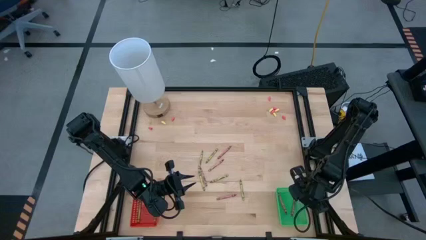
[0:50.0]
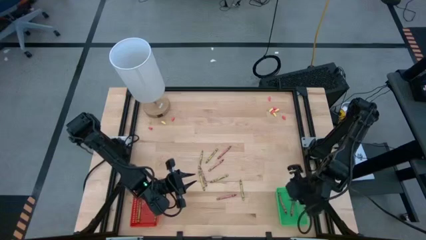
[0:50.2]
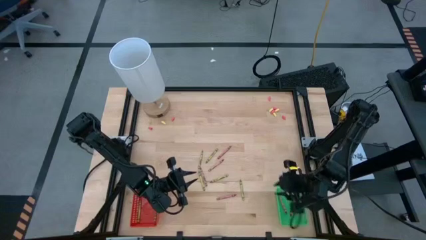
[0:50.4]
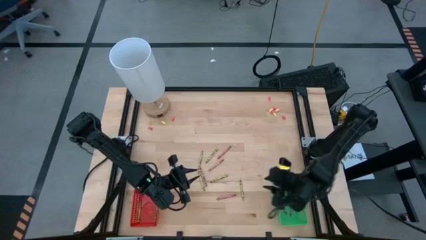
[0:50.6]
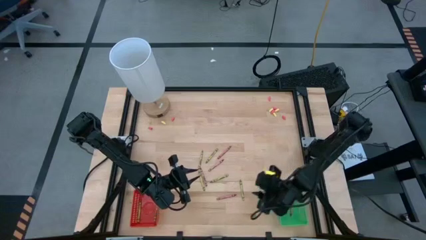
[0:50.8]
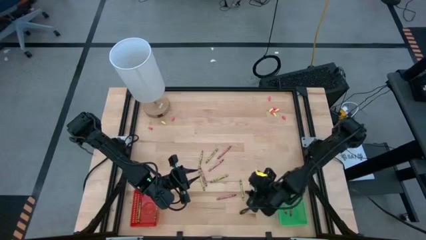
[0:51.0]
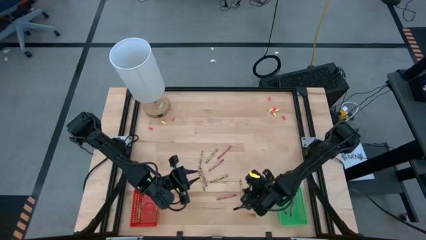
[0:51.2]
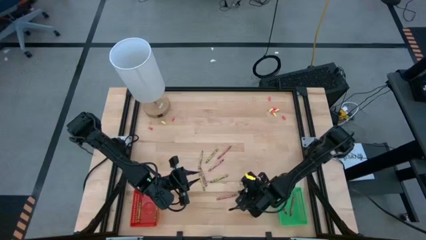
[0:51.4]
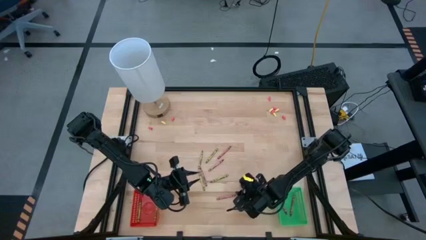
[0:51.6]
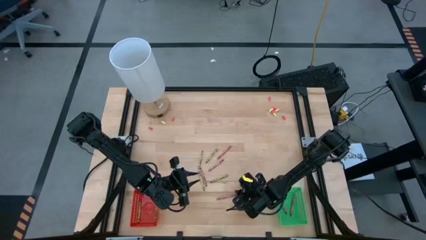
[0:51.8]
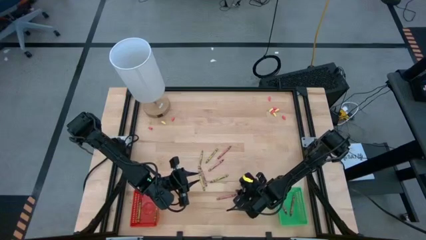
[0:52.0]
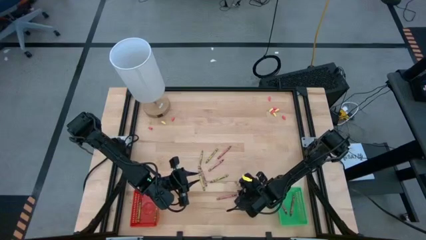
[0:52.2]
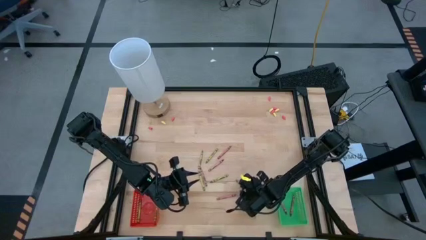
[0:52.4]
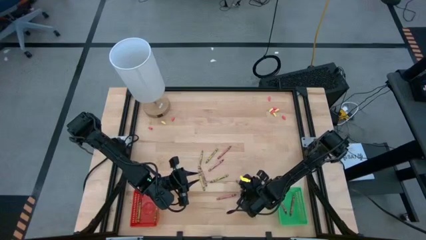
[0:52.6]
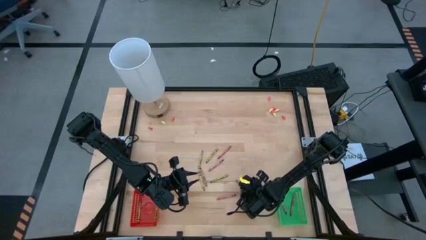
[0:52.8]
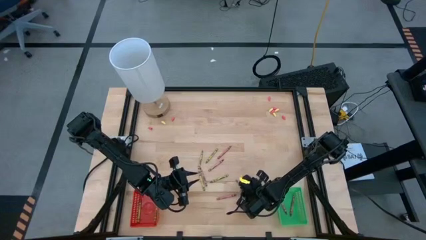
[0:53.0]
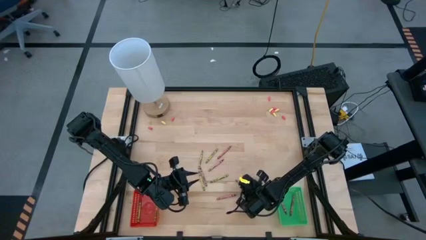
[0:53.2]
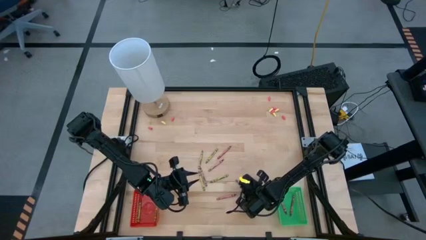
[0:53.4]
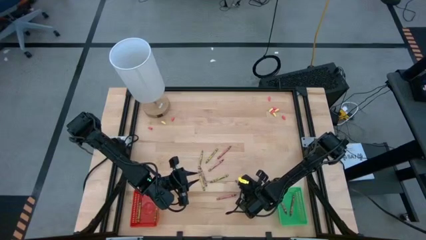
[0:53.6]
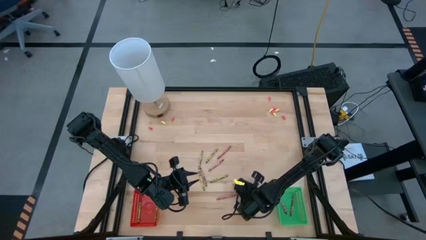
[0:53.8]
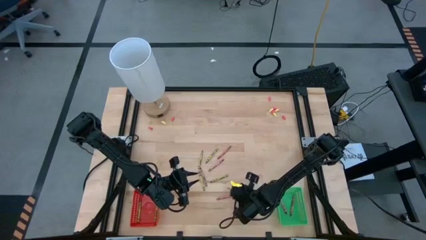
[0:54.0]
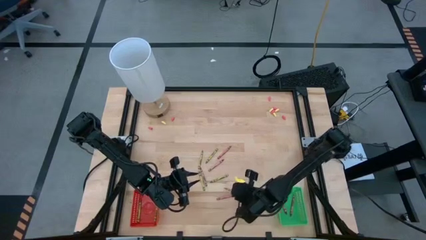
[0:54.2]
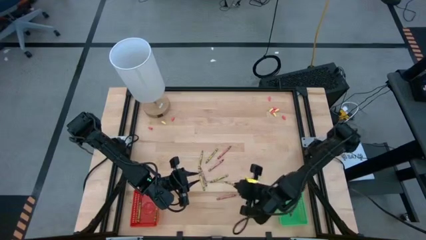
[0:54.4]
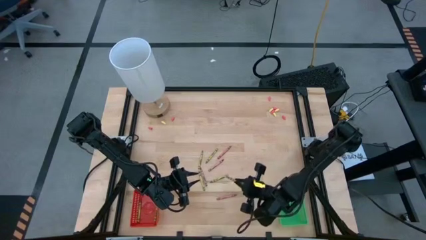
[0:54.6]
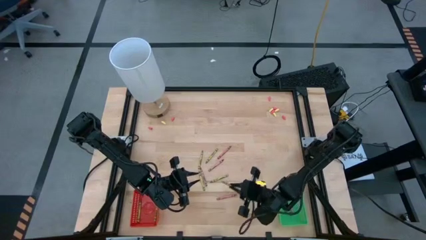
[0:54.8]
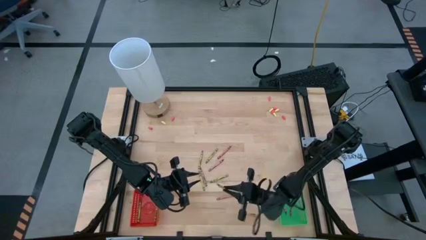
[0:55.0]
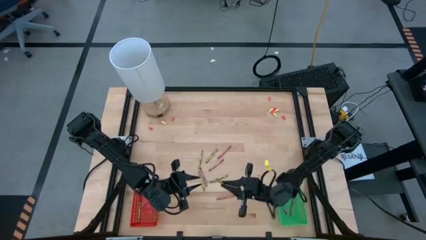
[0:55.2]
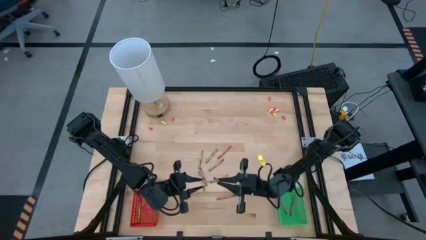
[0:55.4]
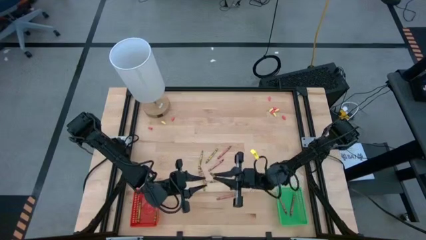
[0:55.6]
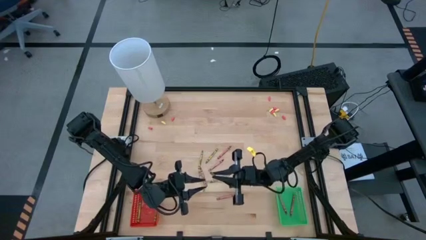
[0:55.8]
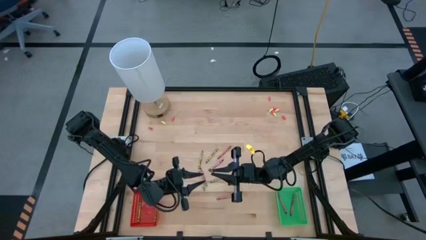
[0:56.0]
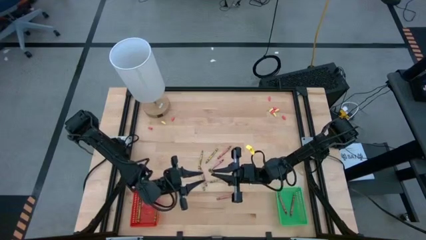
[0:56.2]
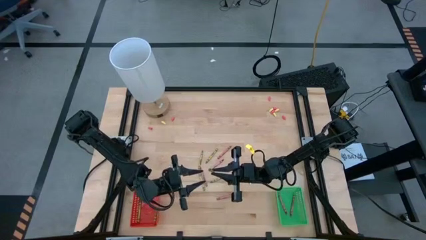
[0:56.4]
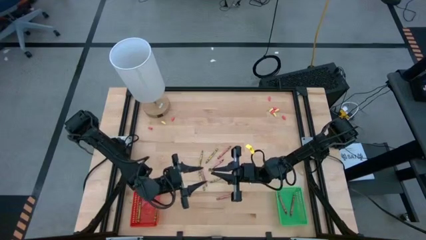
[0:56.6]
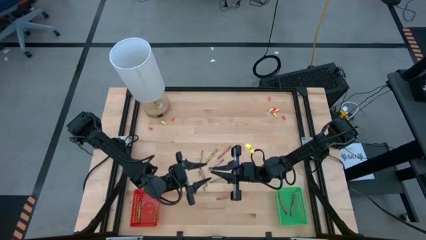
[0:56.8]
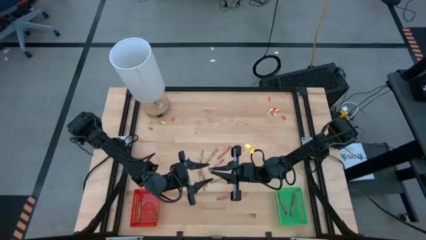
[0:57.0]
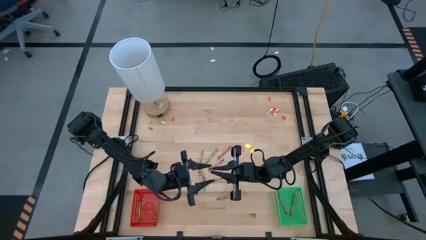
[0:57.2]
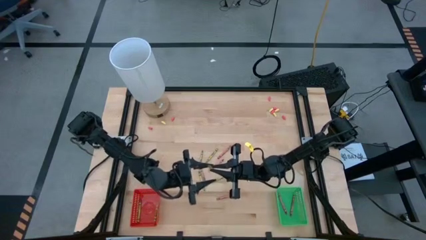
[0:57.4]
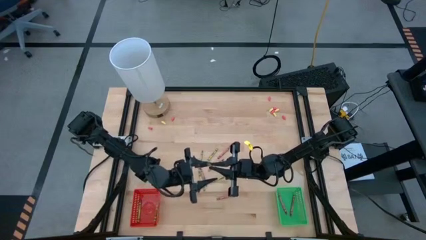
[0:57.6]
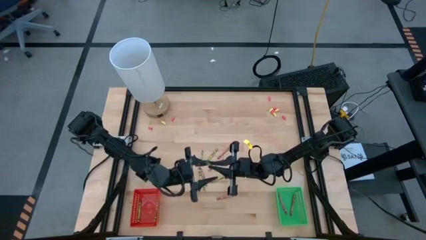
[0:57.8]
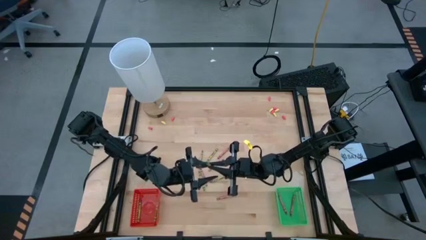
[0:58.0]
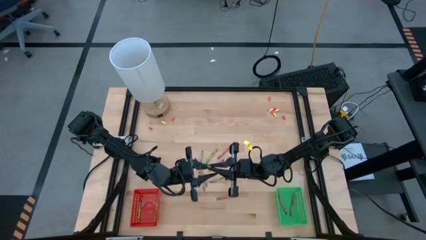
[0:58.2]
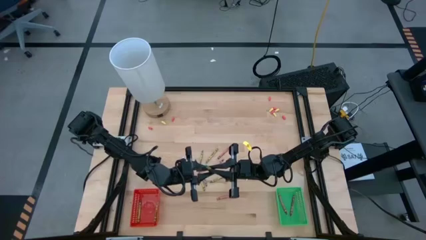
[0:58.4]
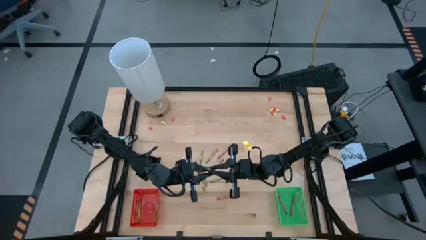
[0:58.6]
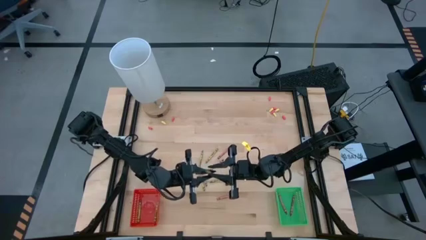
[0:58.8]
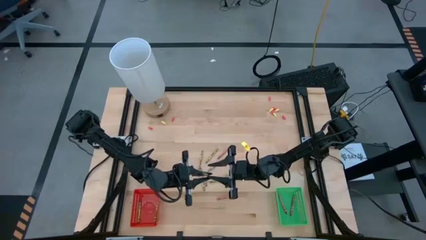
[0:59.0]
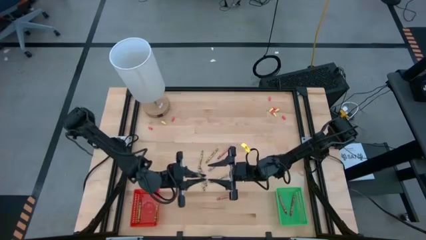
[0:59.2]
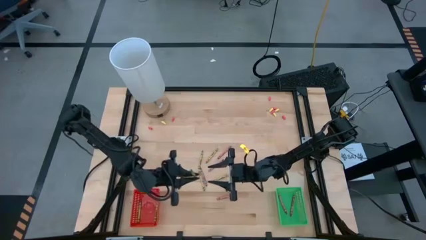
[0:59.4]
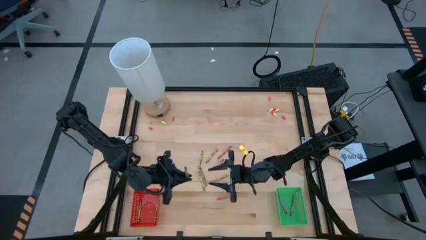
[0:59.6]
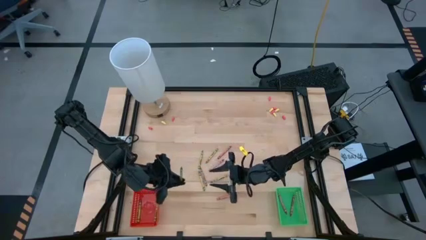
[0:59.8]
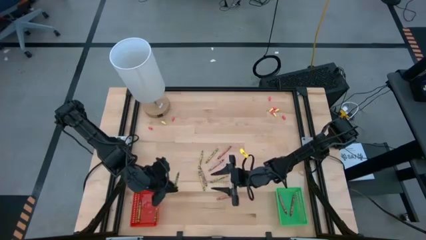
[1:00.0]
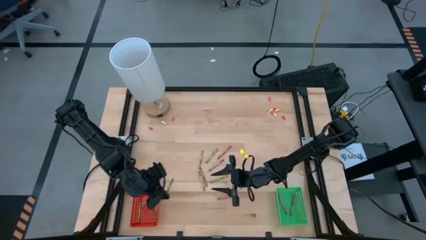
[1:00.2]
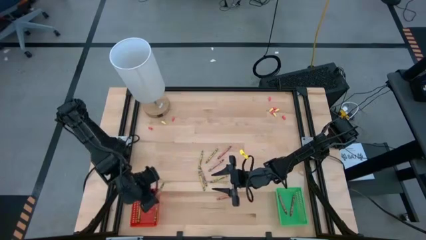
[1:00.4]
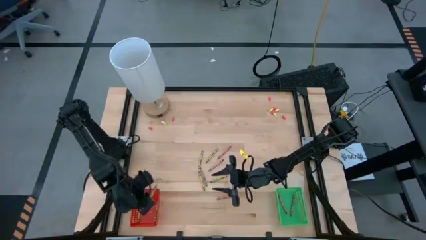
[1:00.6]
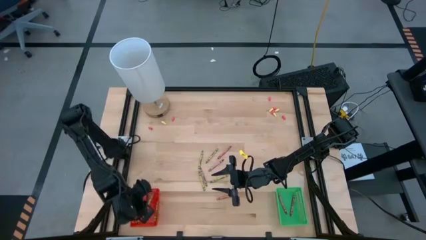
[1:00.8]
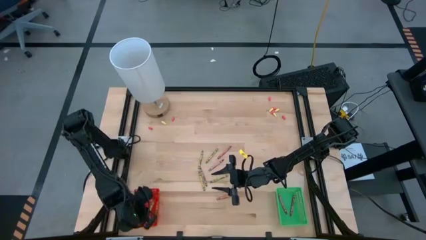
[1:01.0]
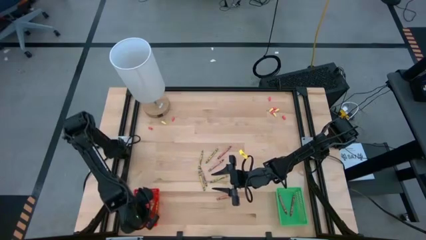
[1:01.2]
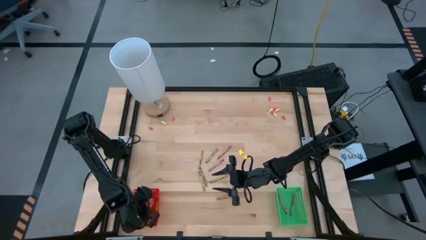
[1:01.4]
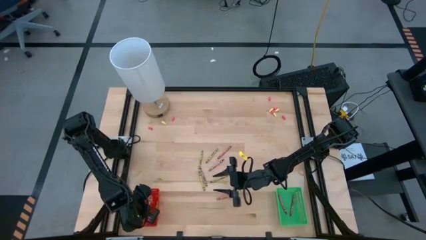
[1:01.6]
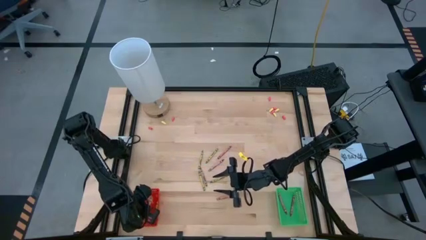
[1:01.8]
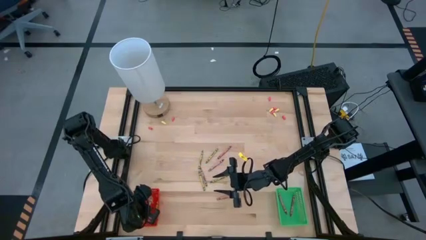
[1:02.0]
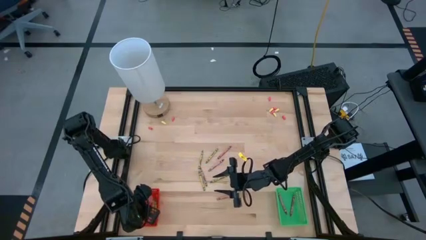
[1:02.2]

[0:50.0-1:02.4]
Task: Sort crayons
Put the green crayon into the red bin

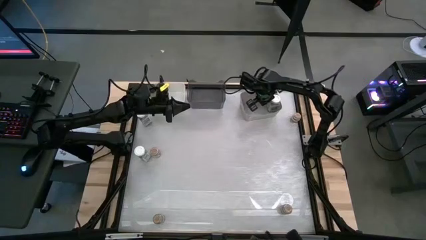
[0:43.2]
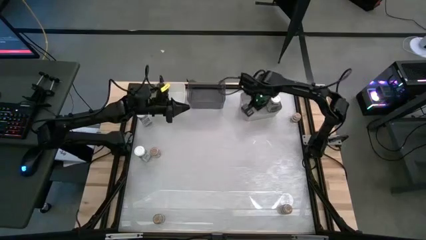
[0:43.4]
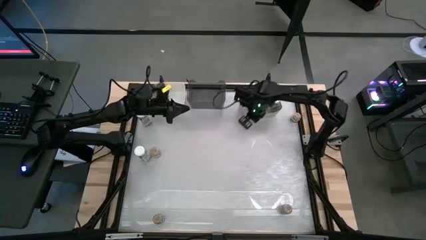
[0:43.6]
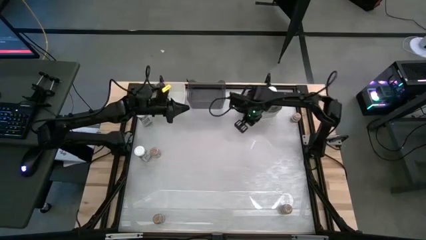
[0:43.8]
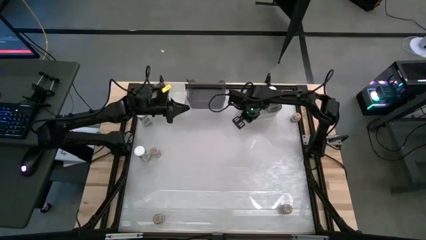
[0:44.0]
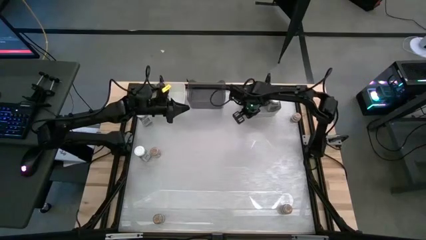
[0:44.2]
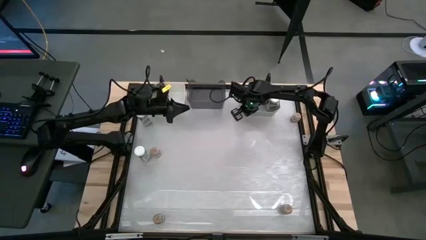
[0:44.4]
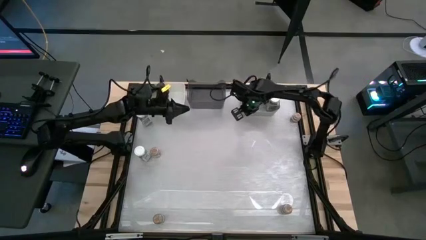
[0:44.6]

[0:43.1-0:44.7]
Task: Sort spices by type
Adjust the gray bin

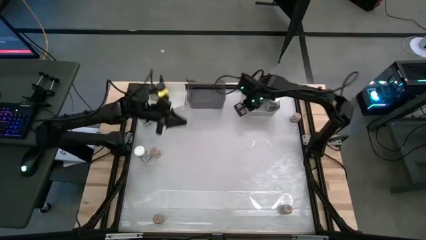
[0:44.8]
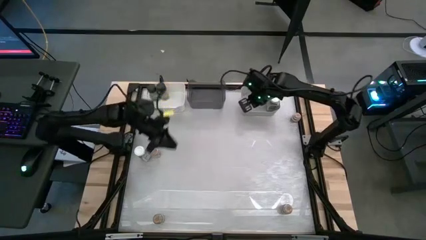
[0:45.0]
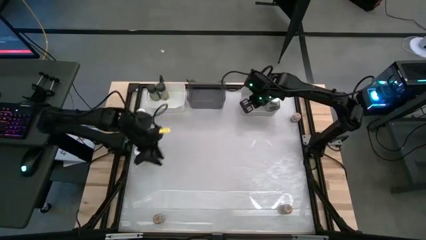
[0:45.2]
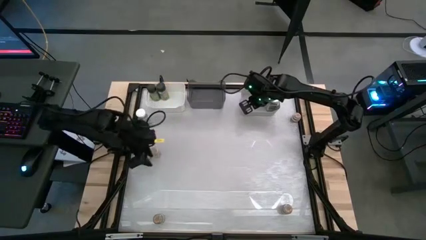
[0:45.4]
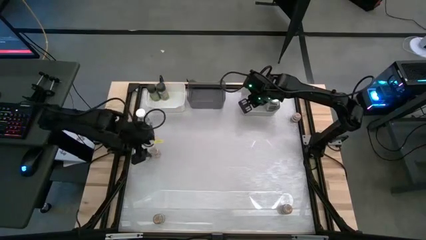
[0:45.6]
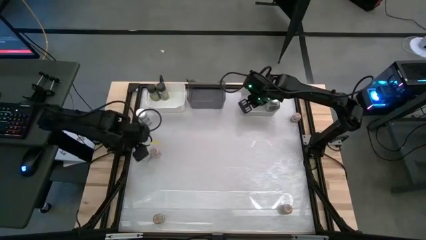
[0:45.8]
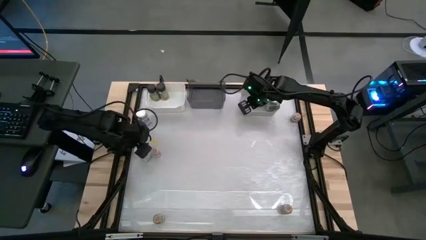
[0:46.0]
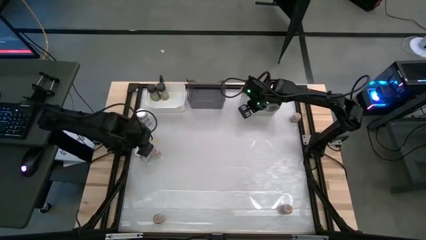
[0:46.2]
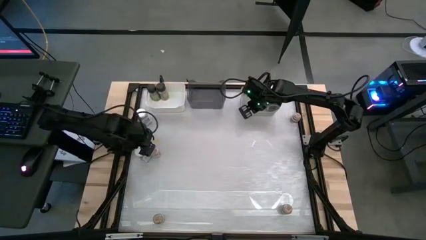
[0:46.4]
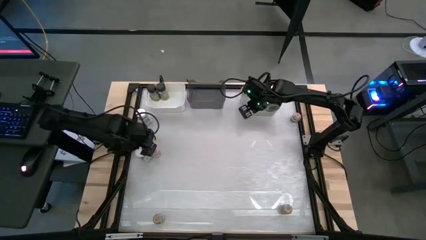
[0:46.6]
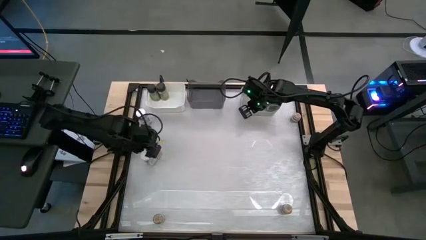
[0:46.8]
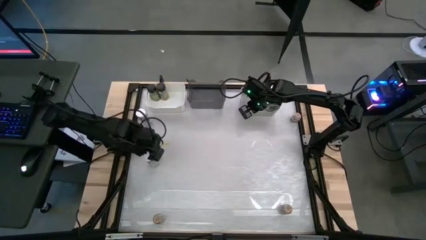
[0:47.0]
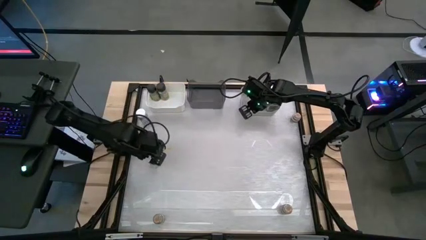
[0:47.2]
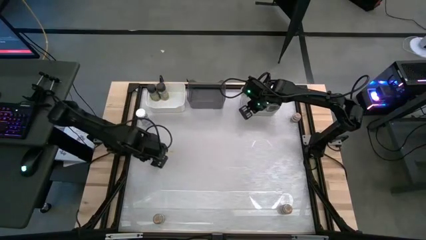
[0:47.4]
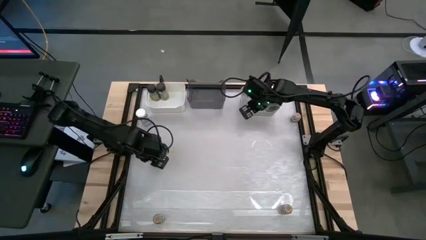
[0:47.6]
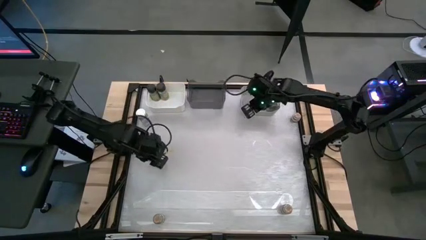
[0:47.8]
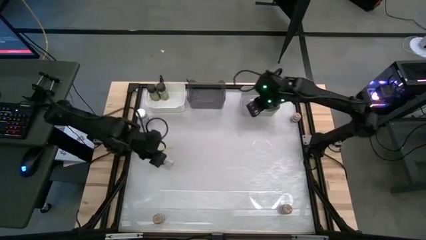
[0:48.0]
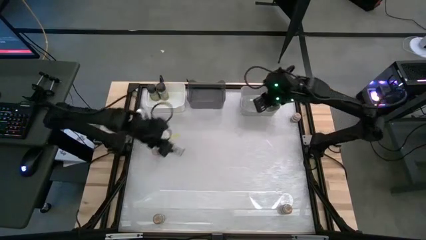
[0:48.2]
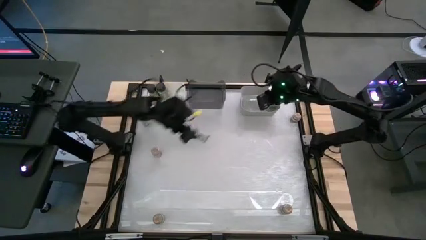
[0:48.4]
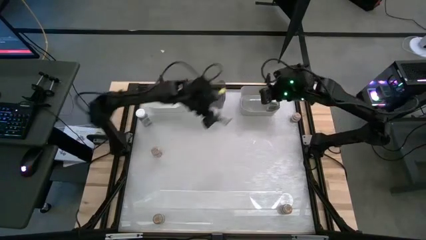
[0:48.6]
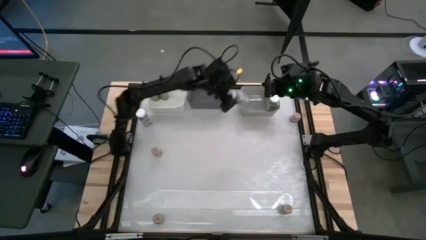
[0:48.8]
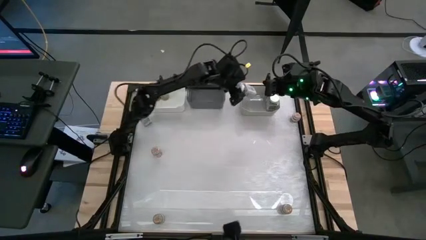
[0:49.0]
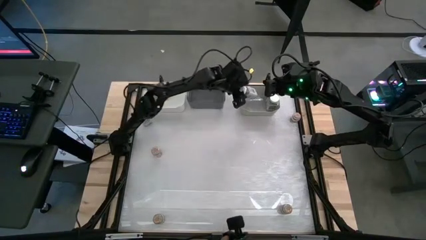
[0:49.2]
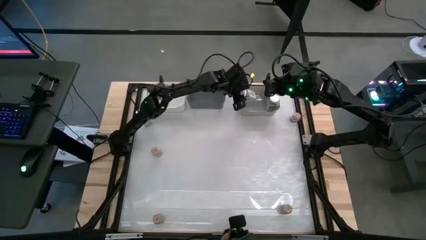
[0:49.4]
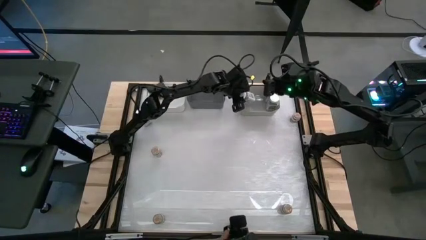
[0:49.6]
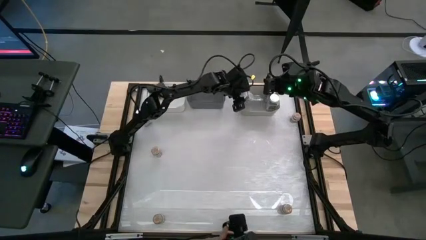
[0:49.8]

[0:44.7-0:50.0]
Put the bottom white seasoning bottle into the gray bin
